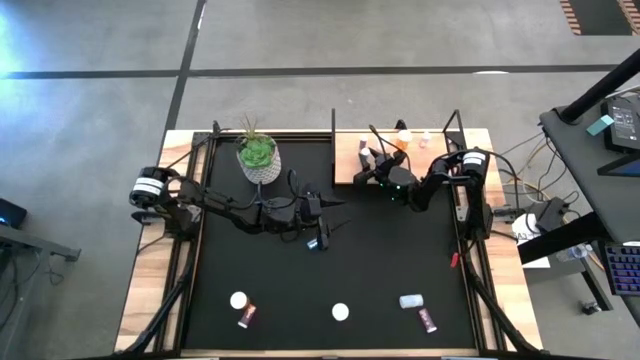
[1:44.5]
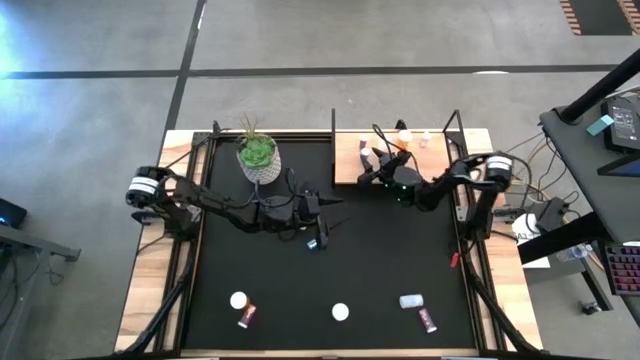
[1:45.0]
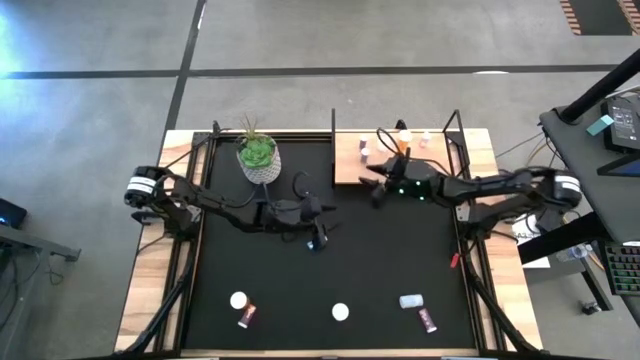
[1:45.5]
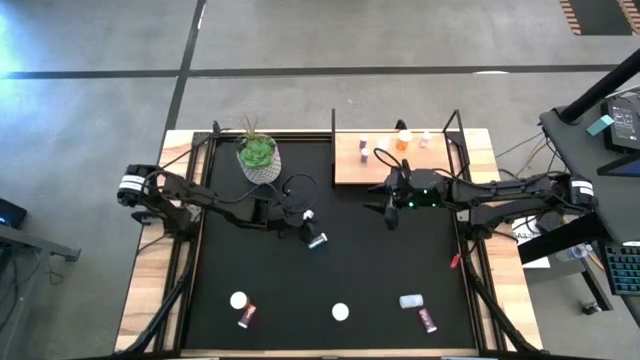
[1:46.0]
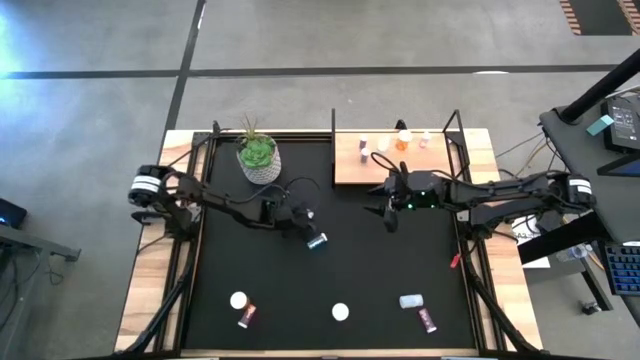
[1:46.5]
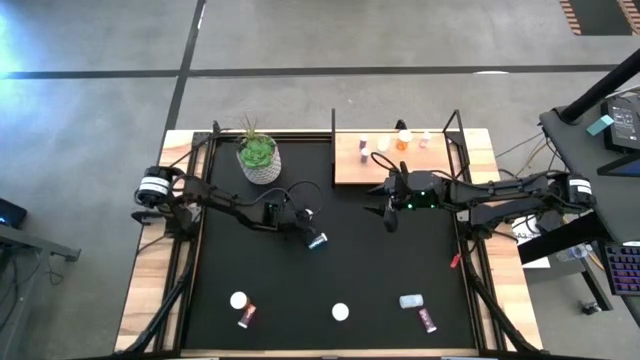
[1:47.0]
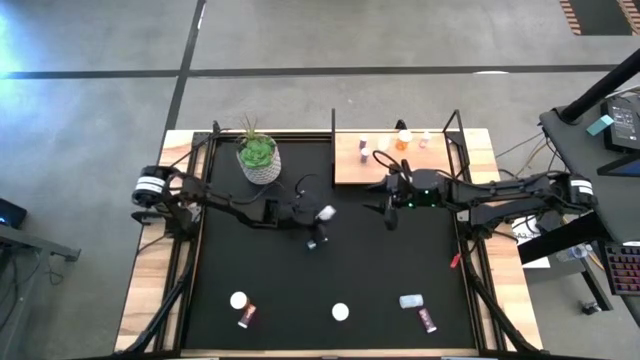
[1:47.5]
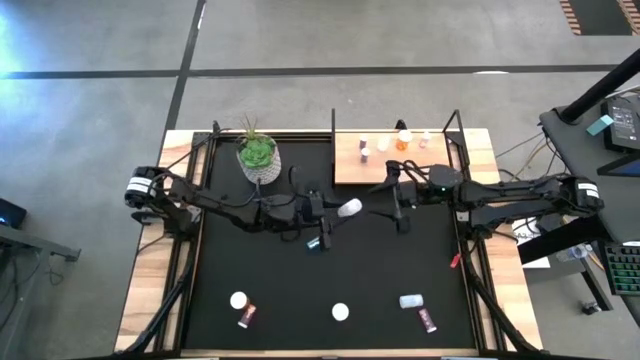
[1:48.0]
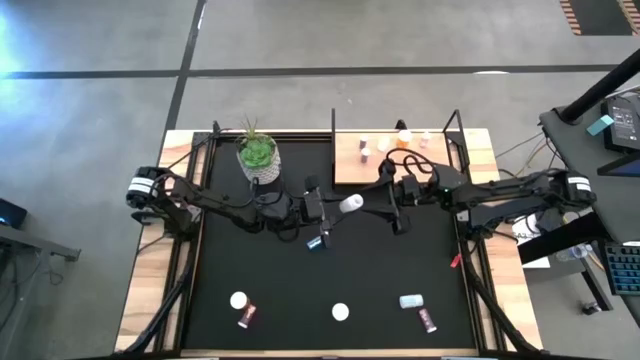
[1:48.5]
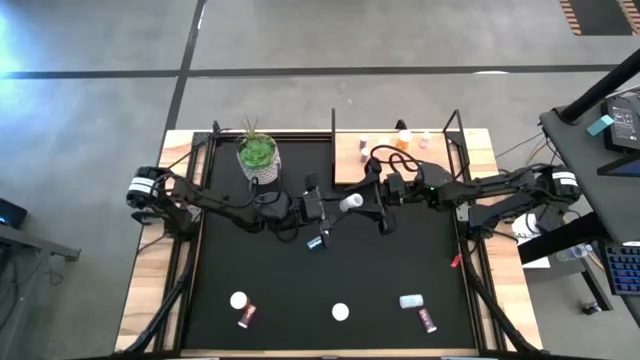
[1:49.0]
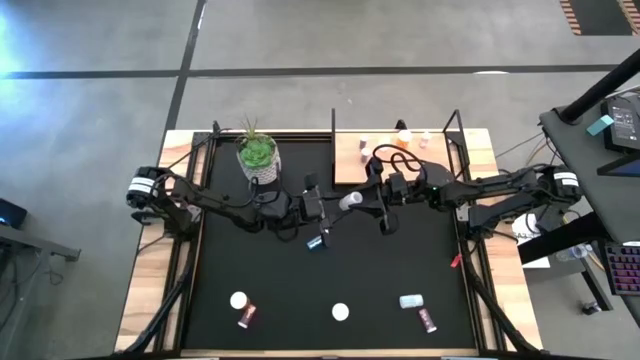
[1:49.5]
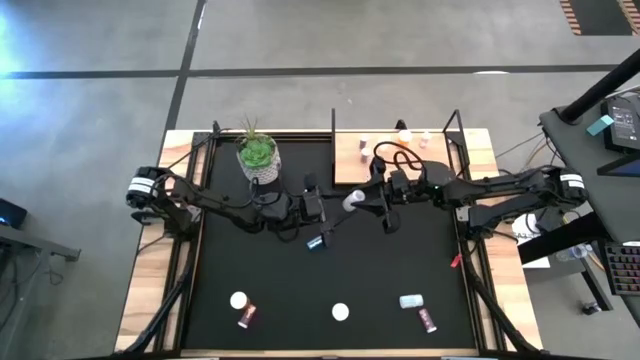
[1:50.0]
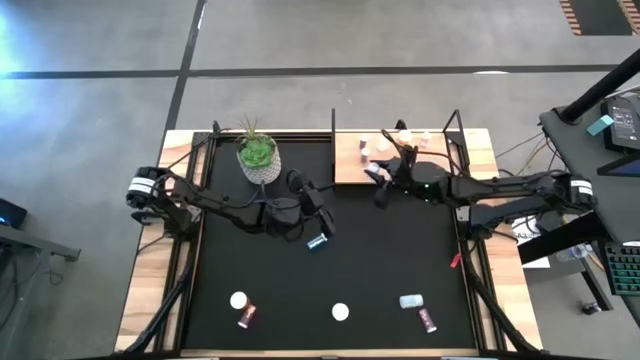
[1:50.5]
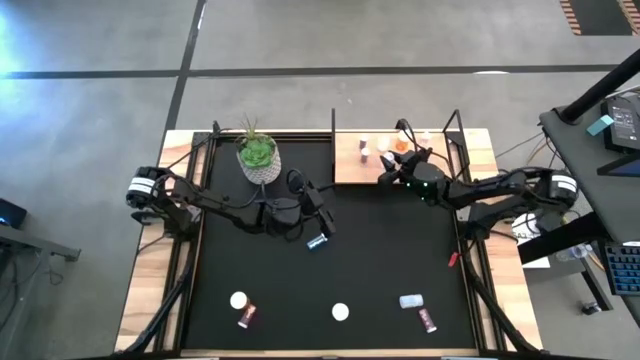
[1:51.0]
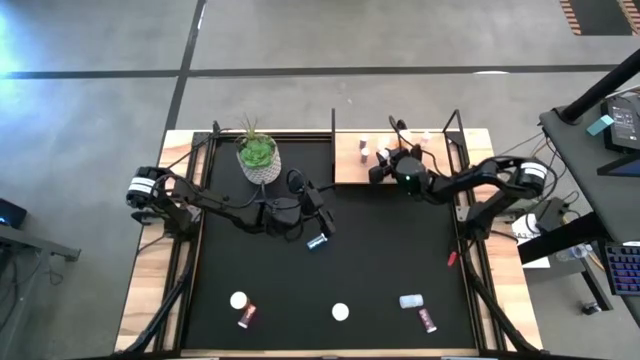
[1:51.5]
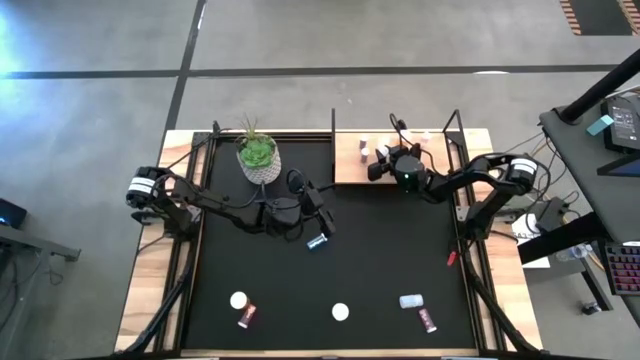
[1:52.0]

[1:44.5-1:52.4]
Task: Pick and place medicine bottles onto shelf by color
Put the top white pill bottle on the shelf aligned with the other white pill bottle

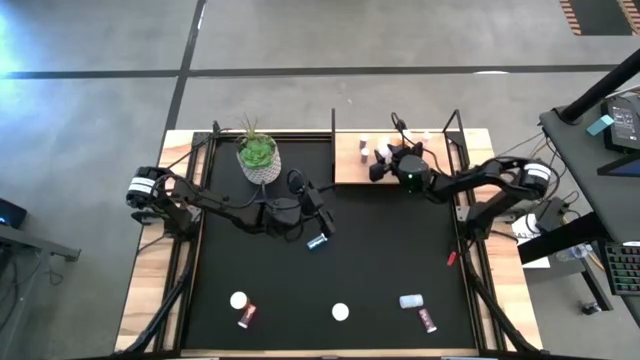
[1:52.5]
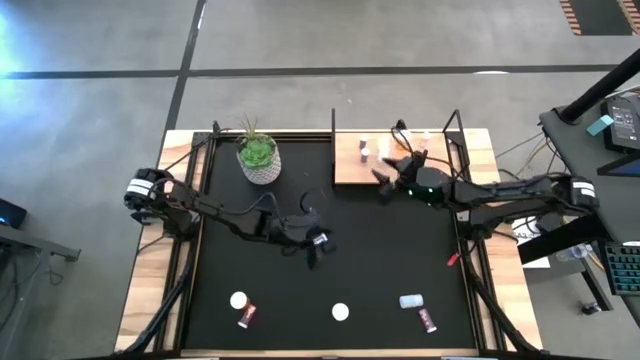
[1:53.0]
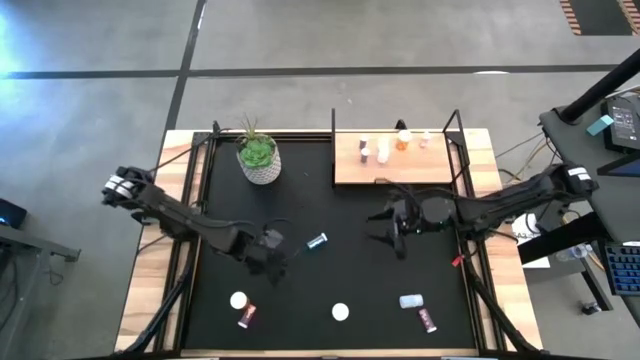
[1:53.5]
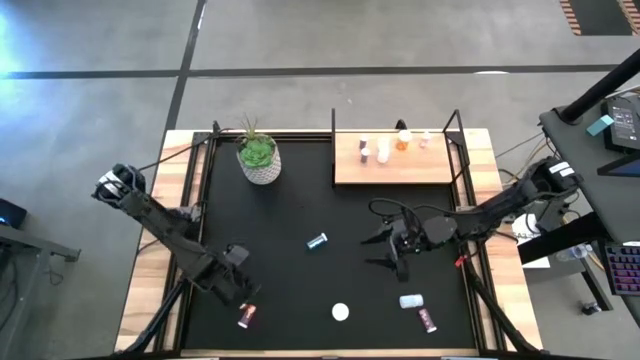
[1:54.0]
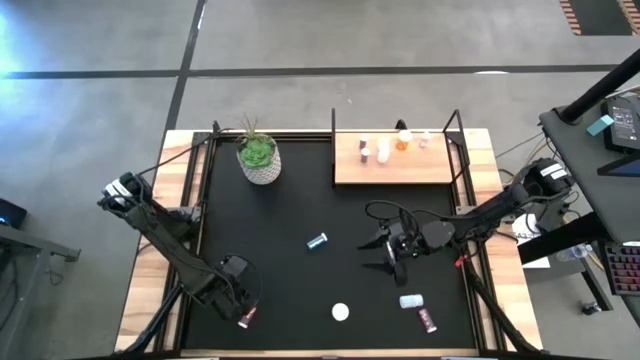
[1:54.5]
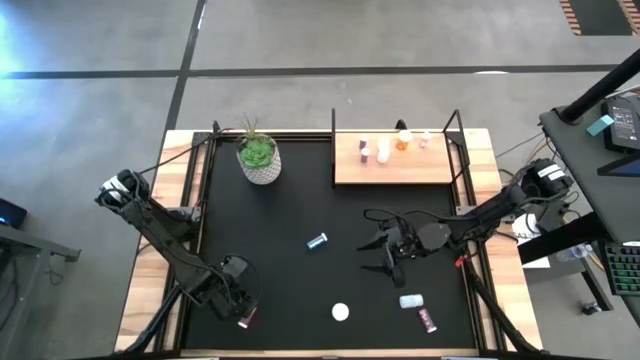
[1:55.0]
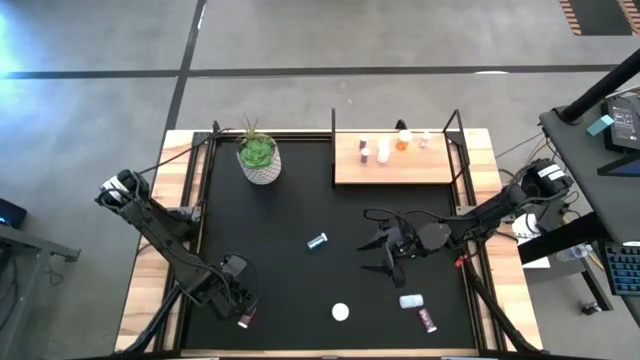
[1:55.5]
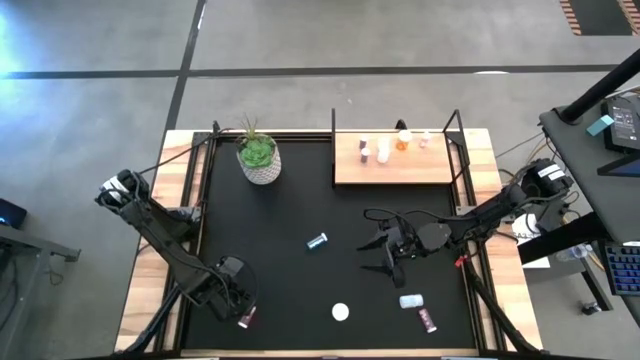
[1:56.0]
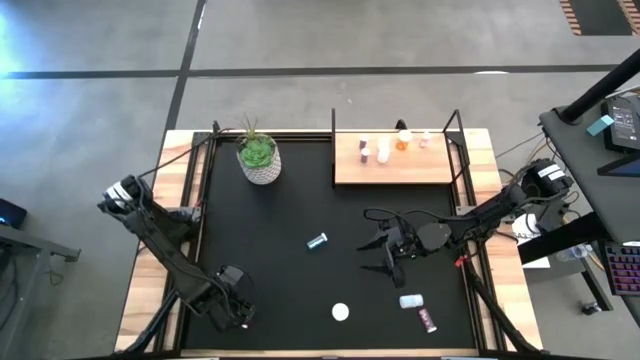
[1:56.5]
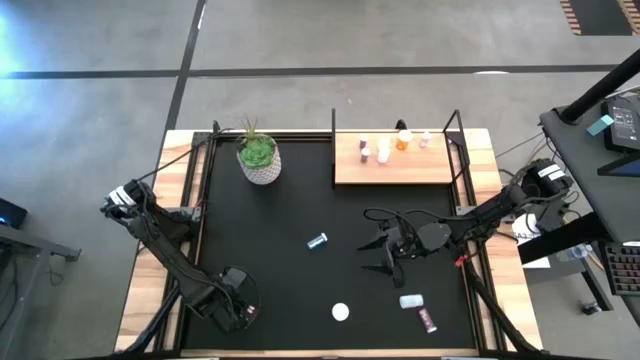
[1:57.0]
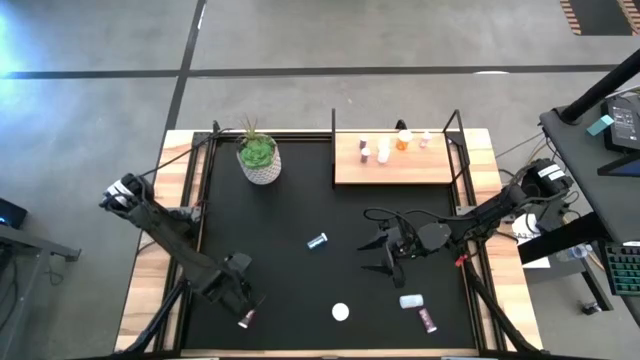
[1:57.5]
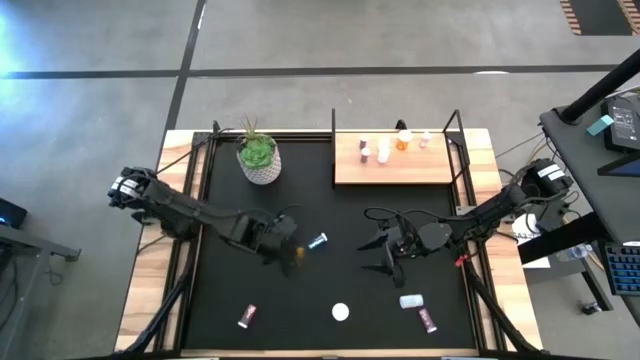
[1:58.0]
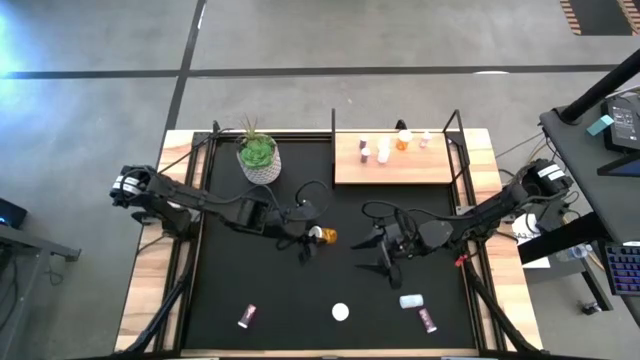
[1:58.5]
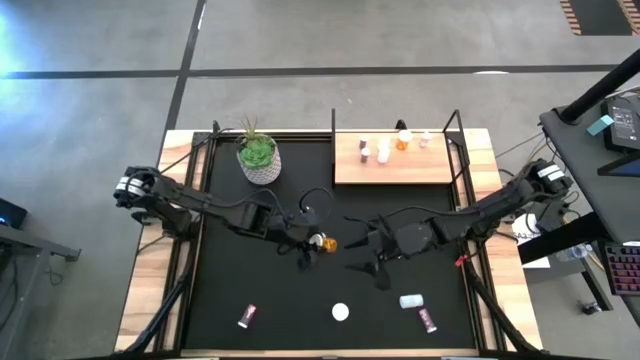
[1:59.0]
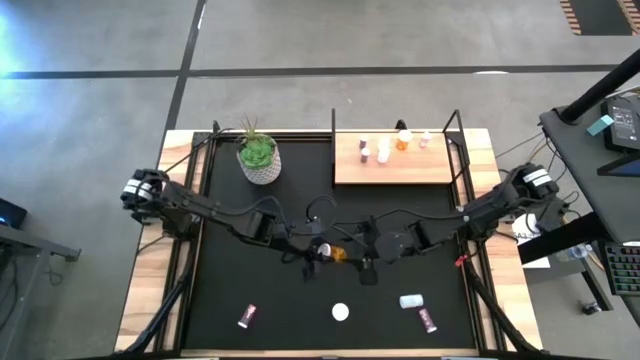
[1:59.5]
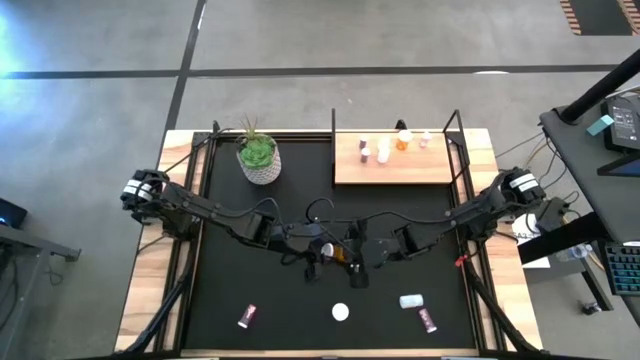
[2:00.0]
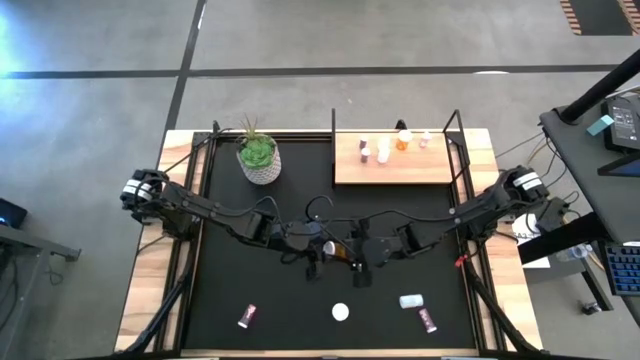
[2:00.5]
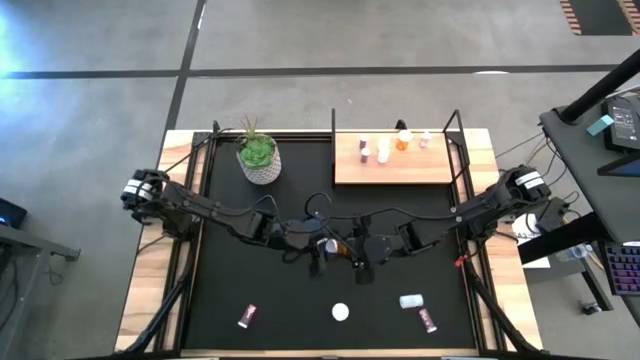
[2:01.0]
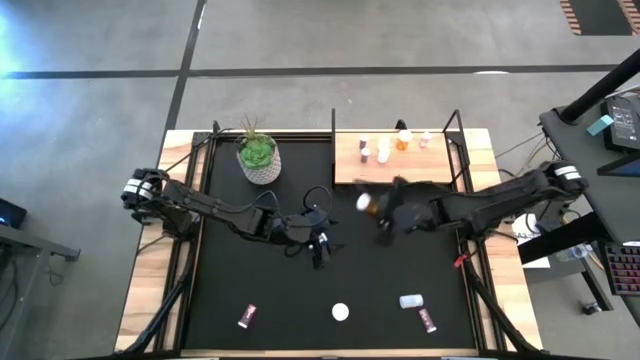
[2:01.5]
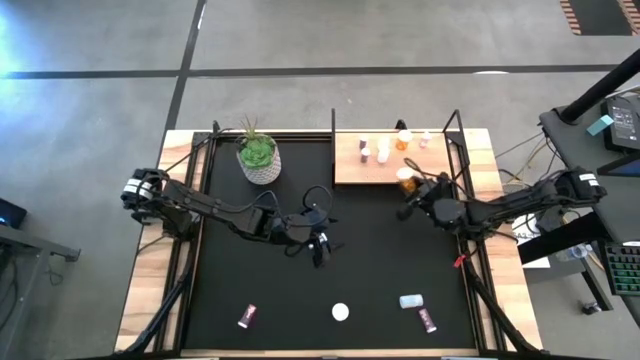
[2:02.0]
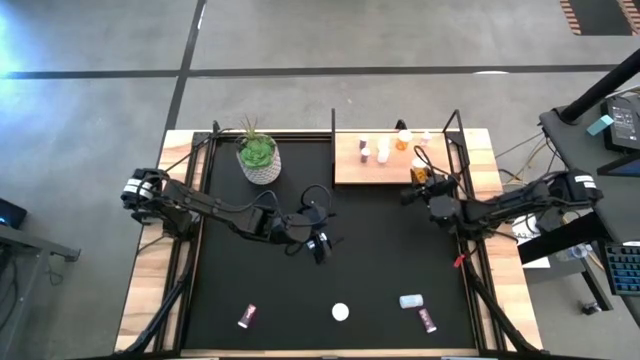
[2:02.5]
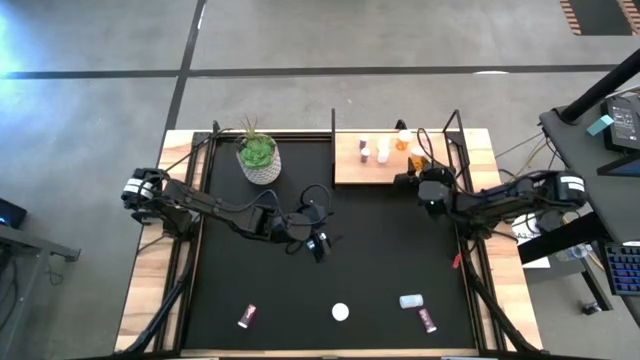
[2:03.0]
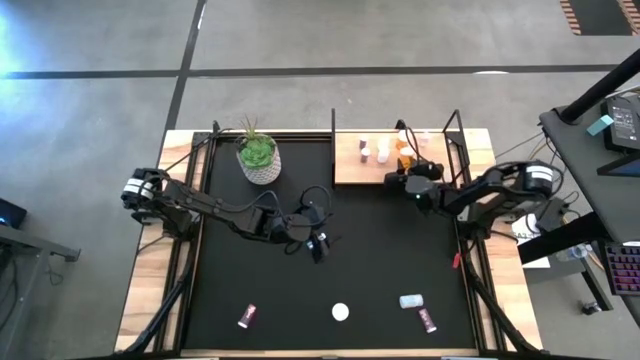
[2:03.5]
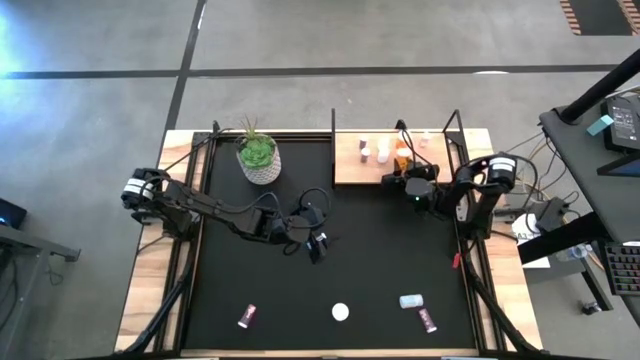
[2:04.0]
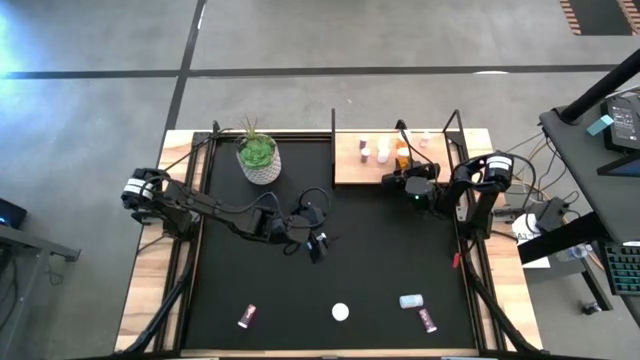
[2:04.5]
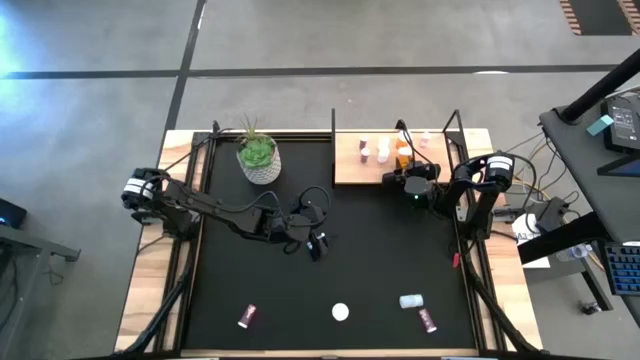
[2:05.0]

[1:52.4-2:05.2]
Put the left orange pill bottle on the shelf aligned with the other orange pill bottle
